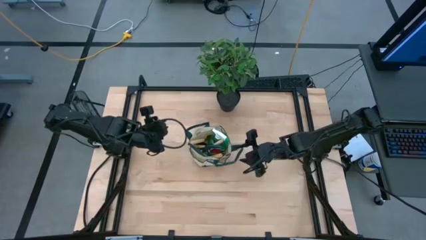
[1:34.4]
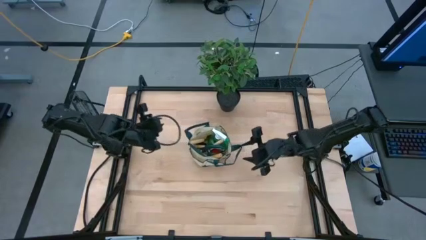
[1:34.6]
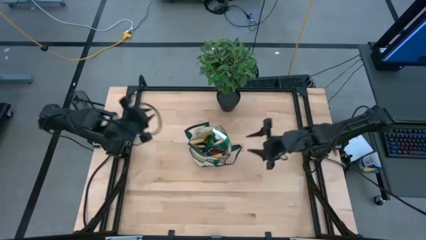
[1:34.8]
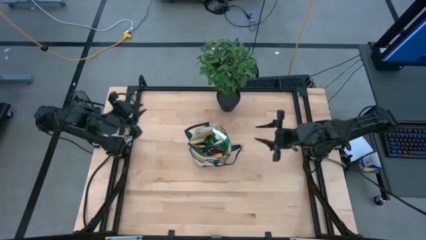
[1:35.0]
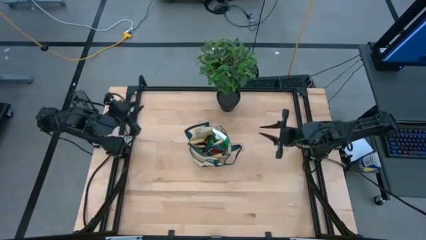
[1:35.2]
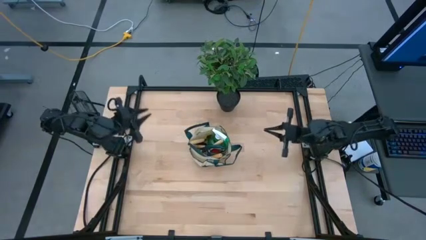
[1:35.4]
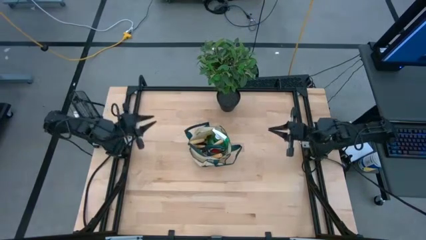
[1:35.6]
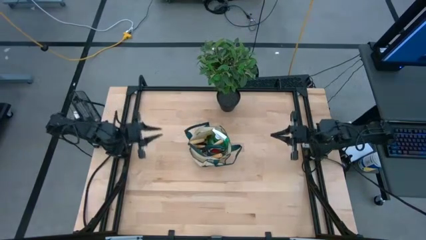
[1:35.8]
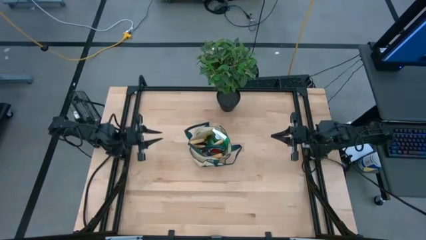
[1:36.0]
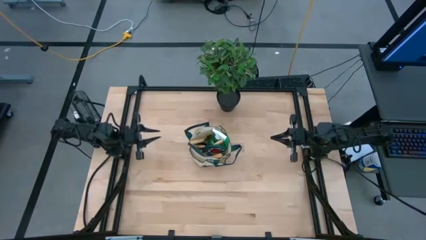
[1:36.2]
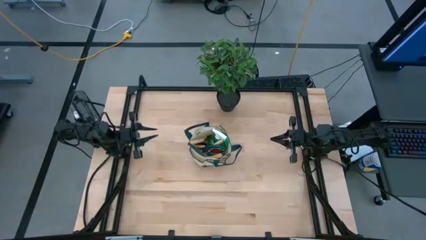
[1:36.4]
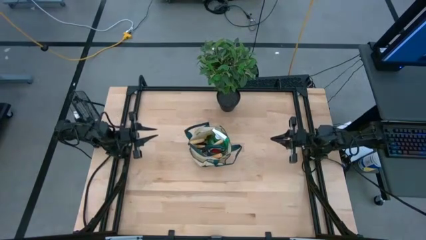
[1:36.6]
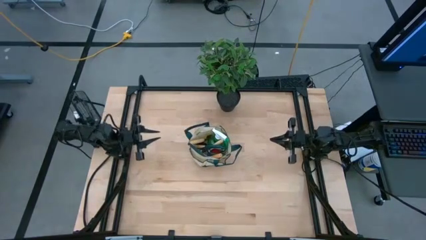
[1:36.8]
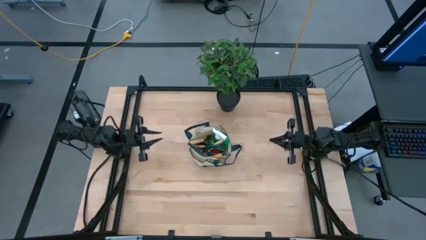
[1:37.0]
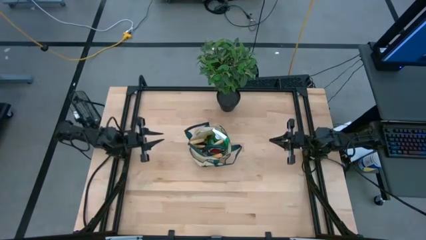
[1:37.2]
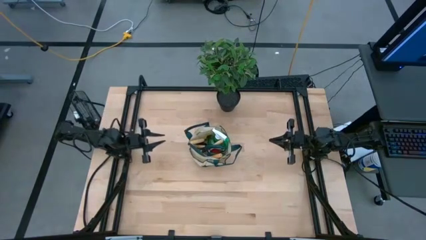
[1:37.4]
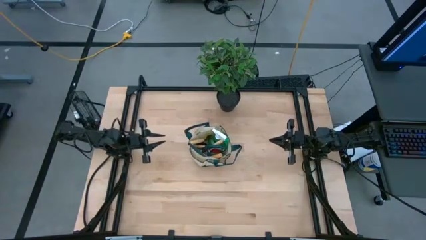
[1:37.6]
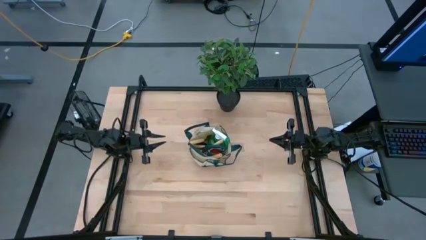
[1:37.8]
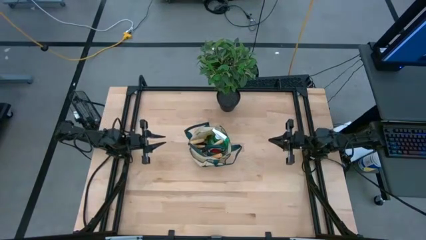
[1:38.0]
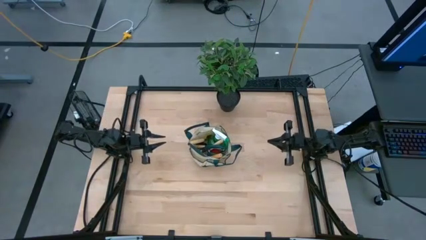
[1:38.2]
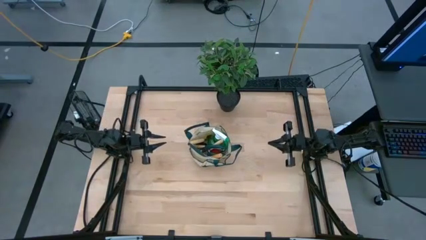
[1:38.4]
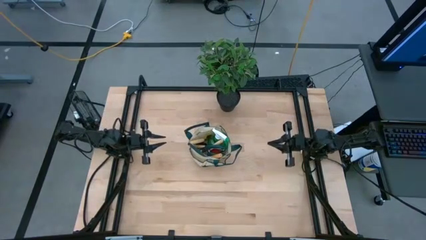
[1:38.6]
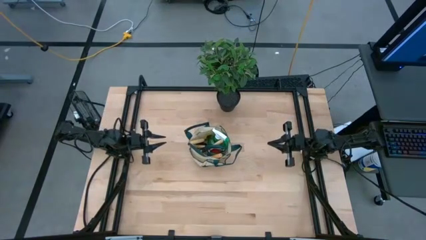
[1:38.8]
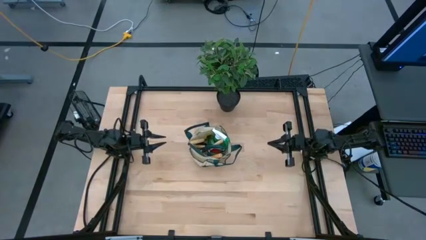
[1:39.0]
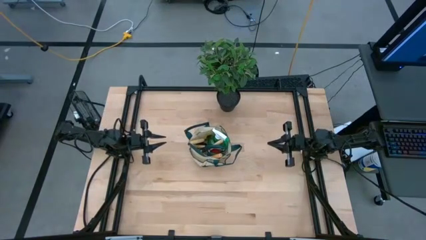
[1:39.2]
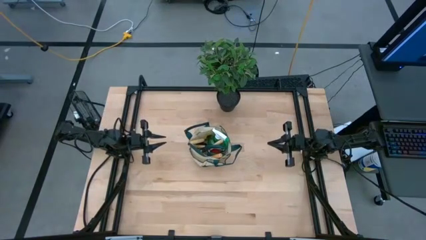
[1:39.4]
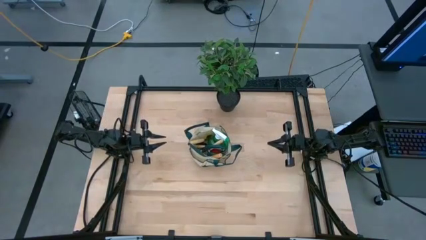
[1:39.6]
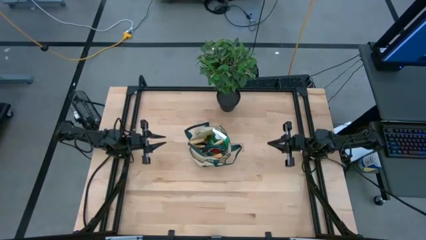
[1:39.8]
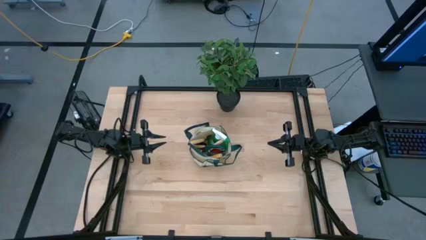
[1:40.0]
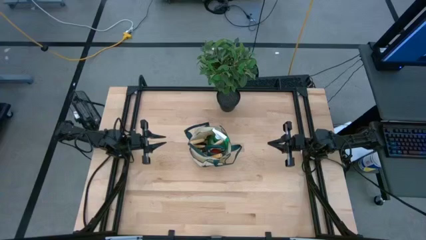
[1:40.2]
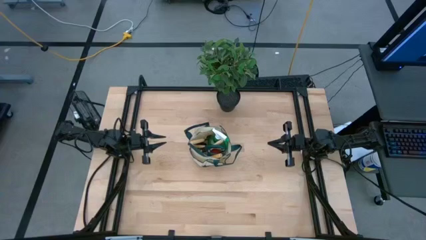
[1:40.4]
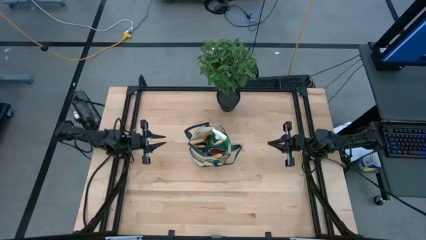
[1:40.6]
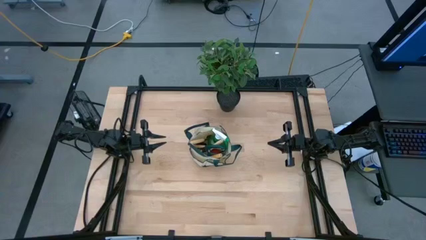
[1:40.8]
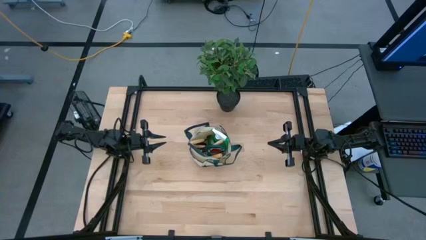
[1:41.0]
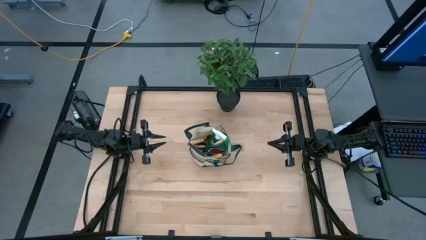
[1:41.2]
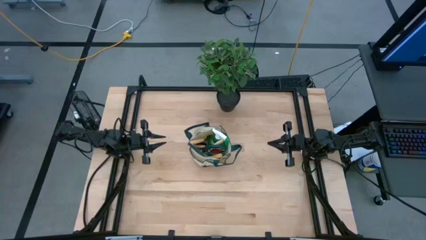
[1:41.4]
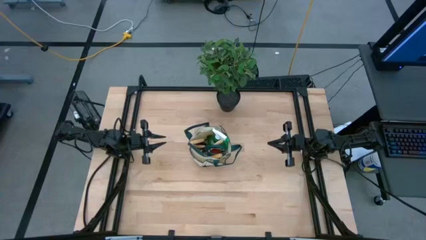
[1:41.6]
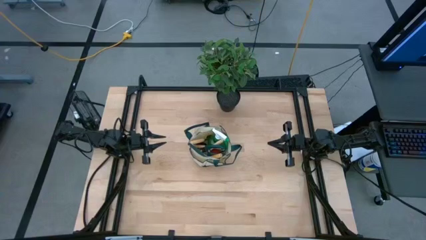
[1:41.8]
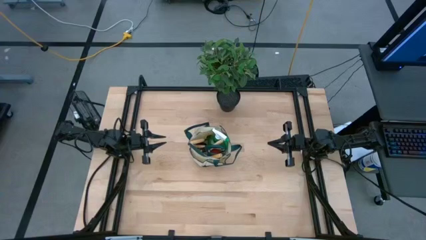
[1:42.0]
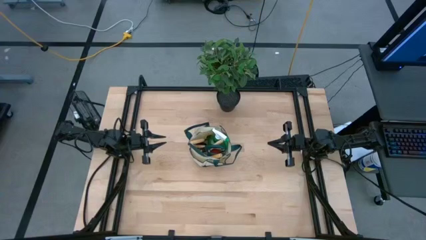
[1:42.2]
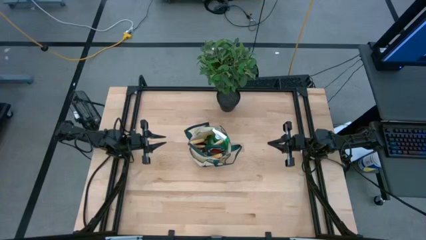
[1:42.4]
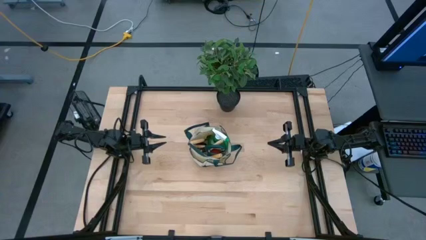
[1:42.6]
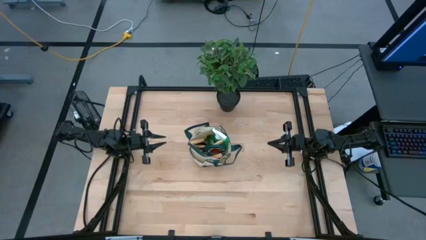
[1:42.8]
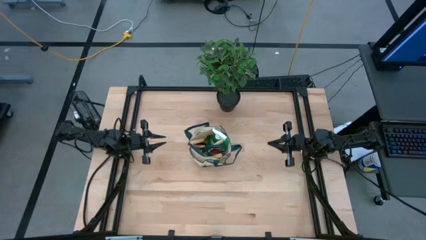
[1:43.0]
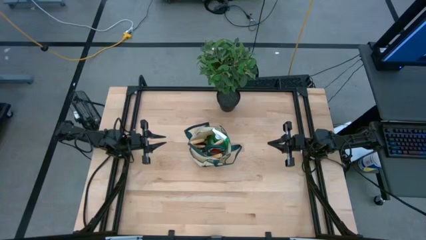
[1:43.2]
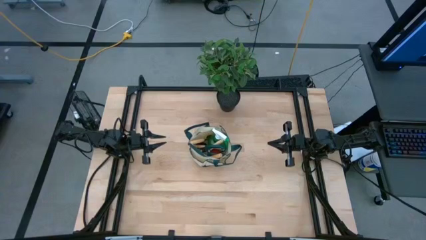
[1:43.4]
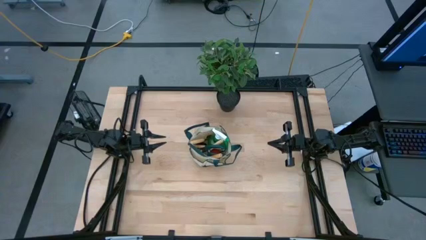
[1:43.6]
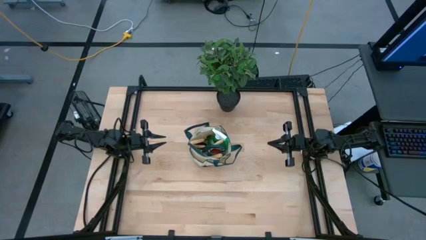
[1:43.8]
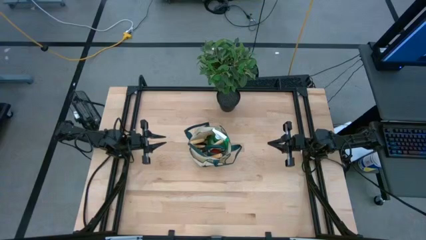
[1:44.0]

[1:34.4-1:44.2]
Task: Pick & Place Garden tools in Gardening bag
Return to Home Position

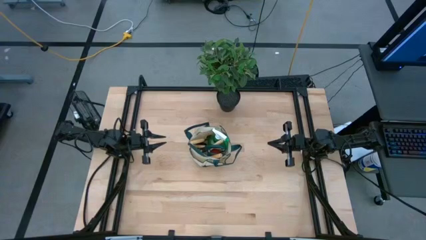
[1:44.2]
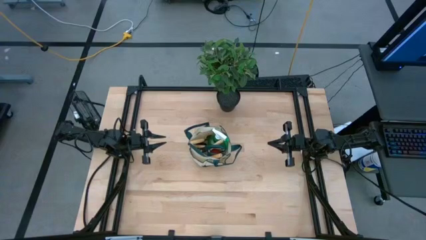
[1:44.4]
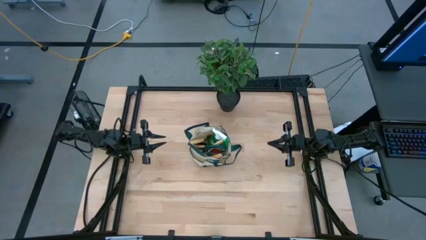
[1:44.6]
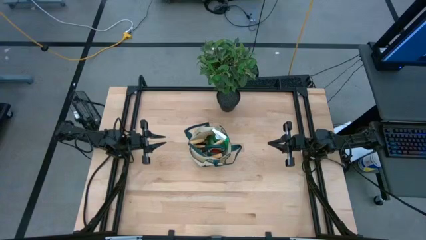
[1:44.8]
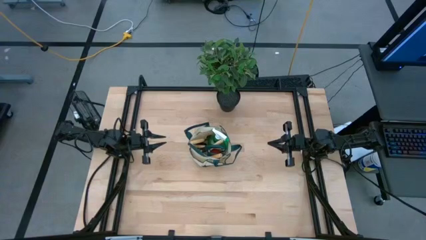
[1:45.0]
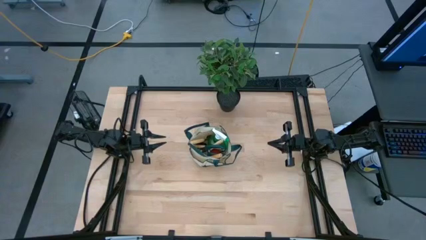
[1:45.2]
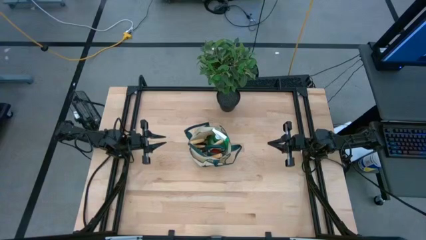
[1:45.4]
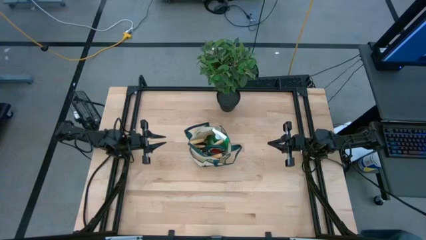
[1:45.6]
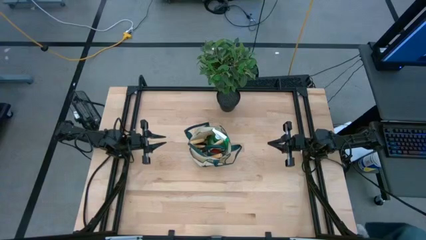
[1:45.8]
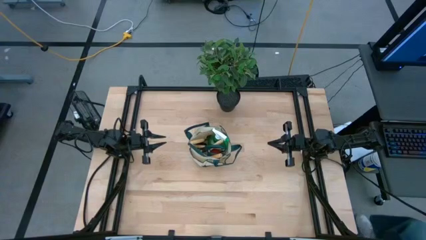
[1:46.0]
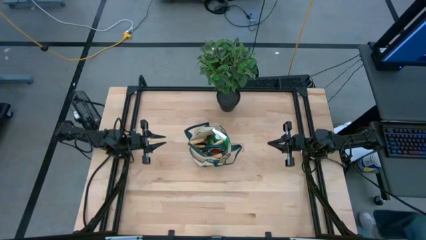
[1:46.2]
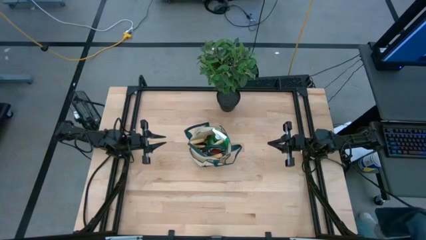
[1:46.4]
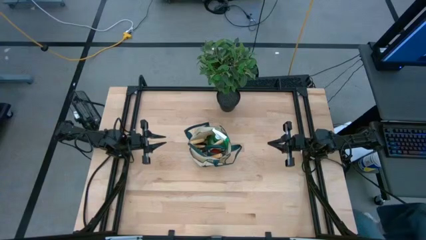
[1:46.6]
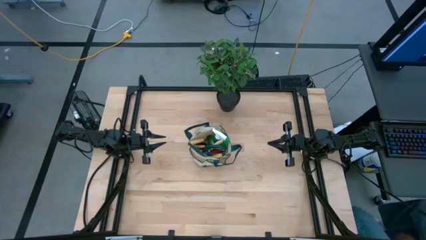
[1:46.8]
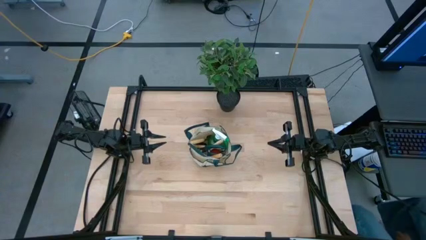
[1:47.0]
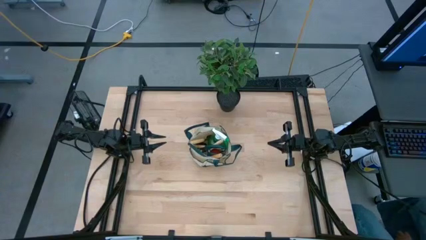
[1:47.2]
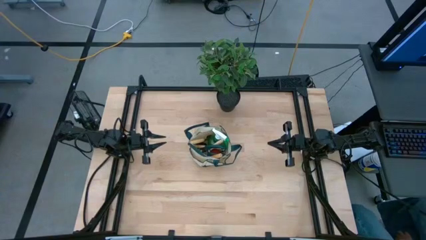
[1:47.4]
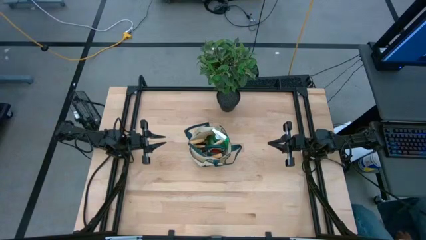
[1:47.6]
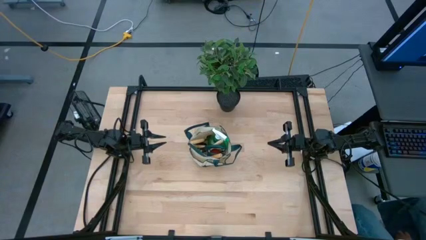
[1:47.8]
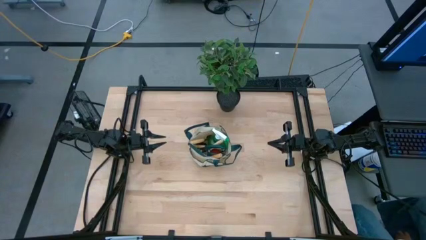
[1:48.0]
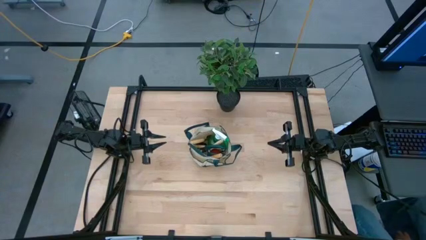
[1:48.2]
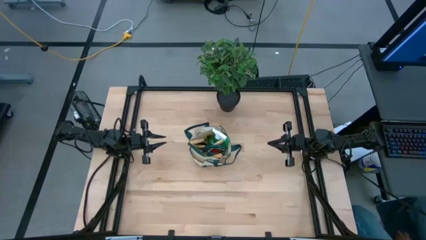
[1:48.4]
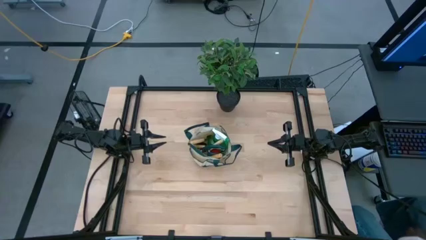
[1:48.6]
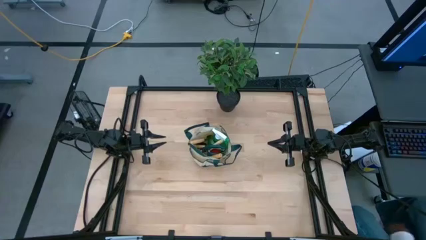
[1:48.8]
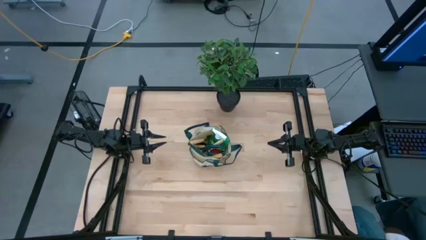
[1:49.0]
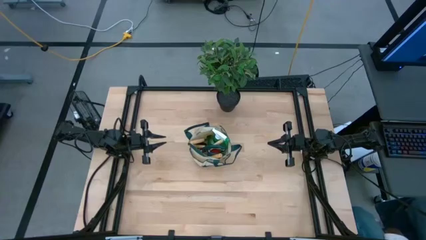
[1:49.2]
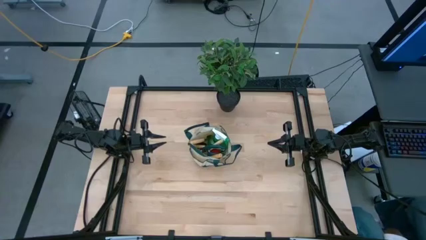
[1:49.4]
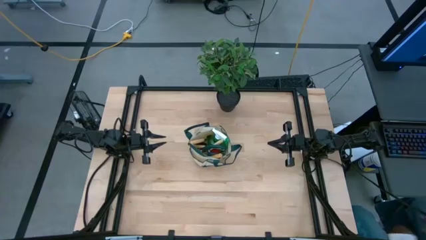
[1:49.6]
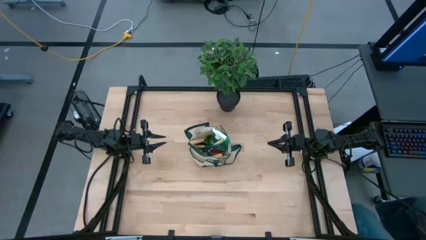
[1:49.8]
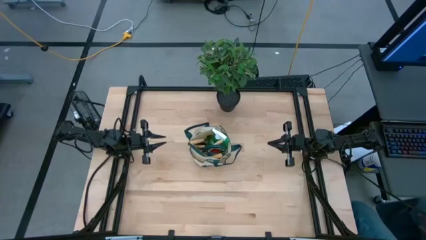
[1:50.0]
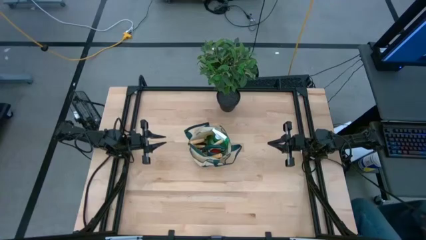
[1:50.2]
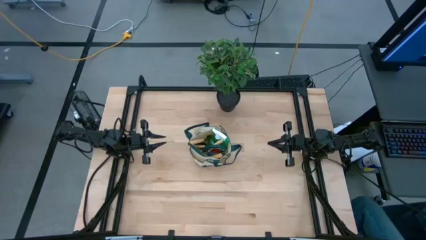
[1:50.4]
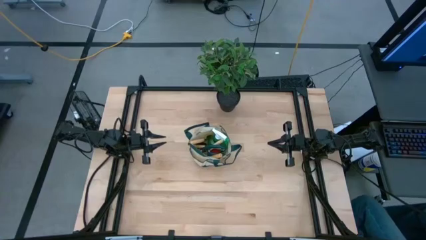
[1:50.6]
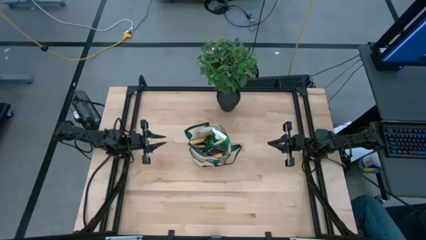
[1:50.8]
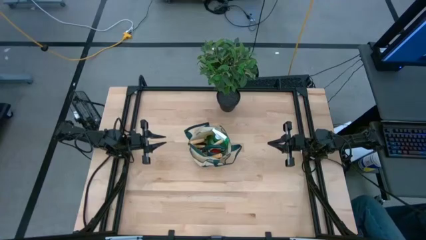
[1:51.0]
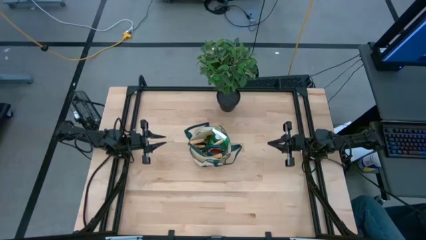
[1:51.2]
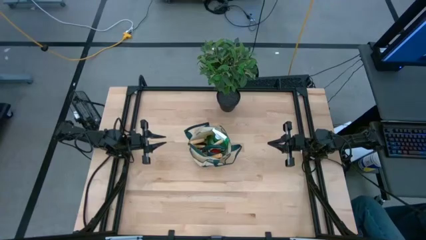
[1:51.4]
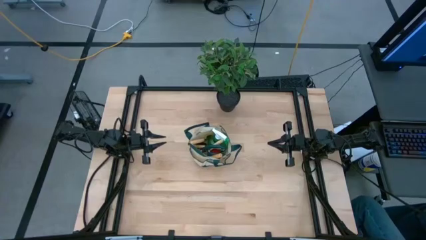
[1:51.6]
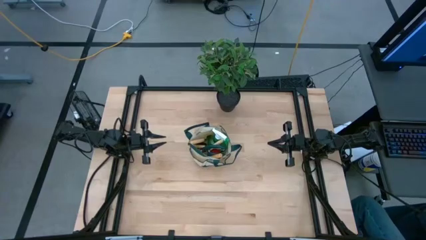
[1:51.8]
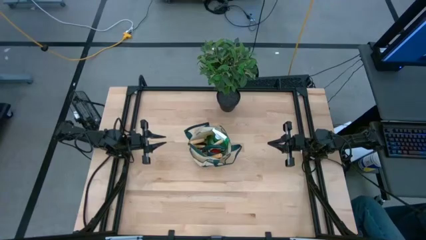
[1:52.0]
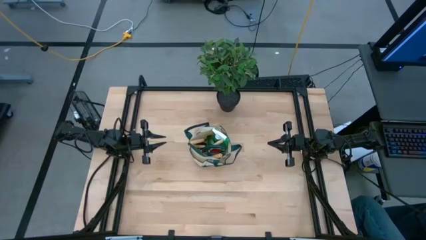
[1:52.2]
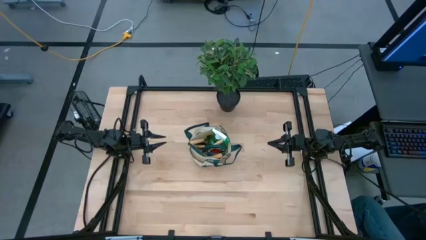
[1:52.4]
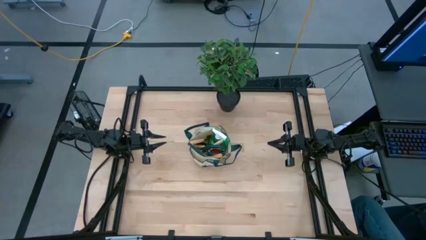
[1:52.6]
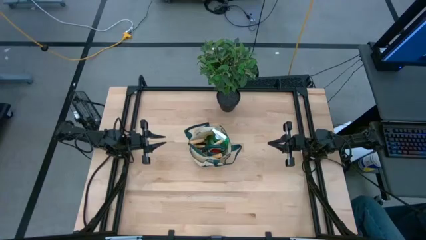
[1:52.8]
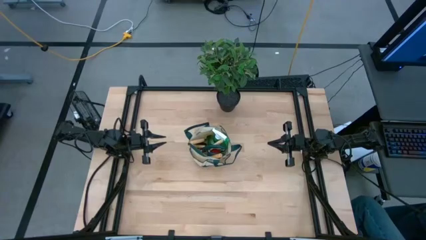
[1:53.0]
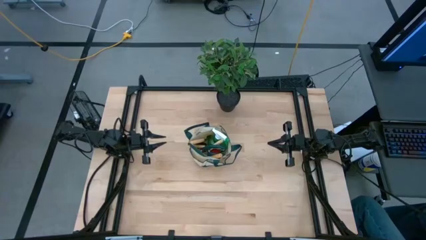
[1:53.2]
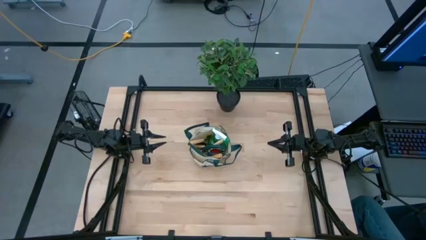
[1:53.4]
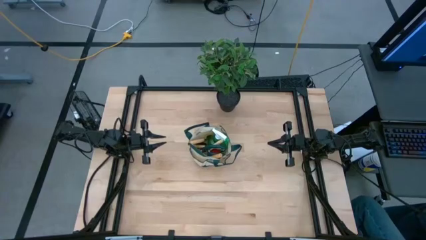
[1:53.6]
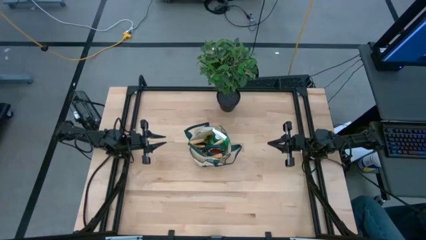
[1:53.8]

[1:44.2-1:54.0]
Return to Home Position
